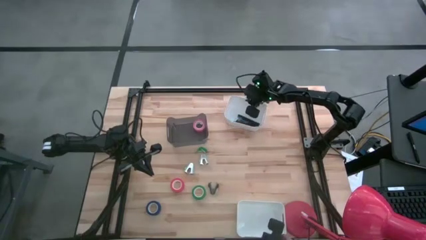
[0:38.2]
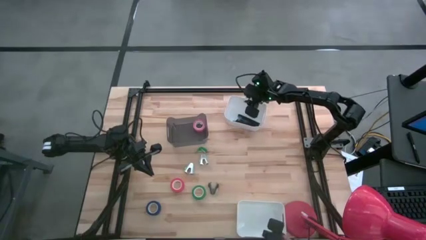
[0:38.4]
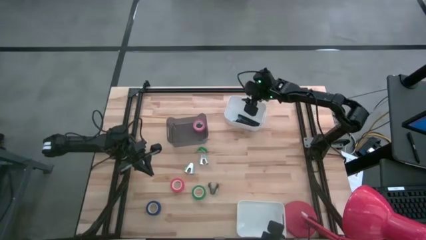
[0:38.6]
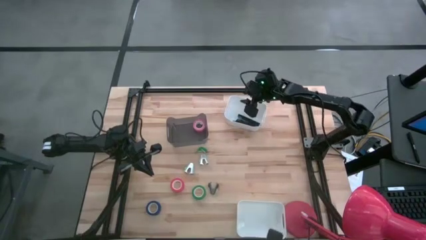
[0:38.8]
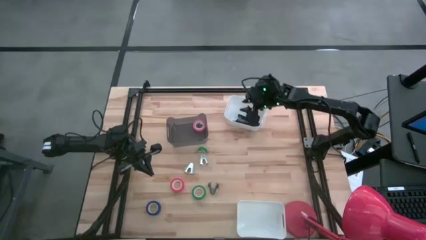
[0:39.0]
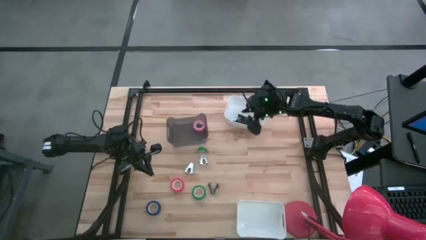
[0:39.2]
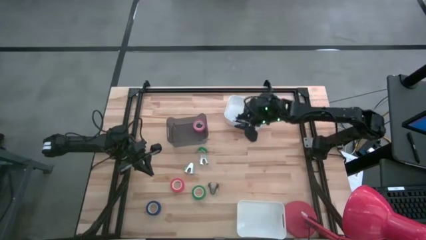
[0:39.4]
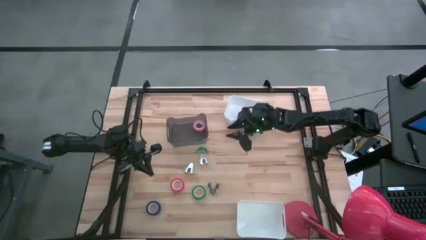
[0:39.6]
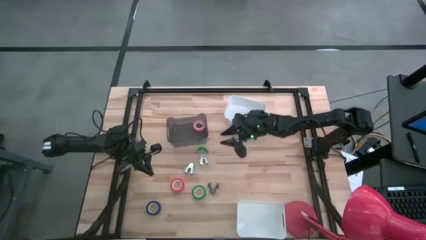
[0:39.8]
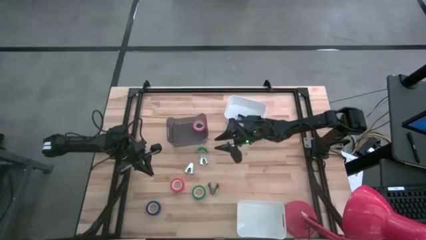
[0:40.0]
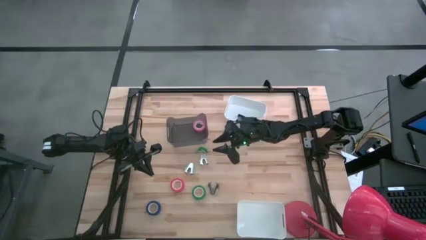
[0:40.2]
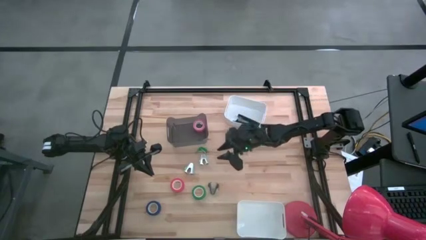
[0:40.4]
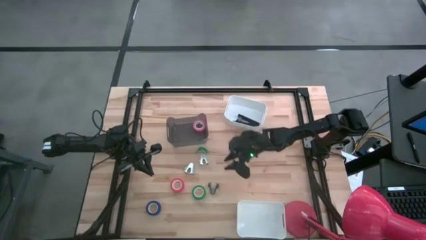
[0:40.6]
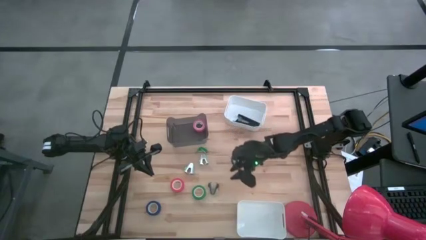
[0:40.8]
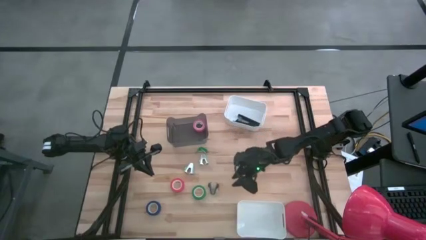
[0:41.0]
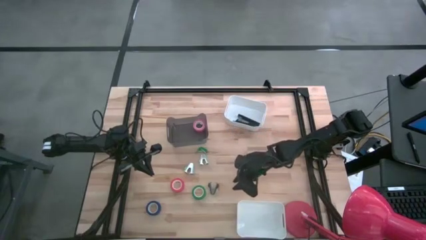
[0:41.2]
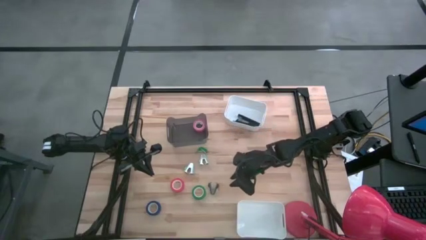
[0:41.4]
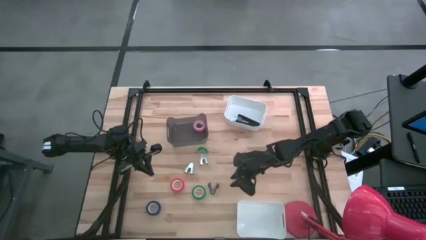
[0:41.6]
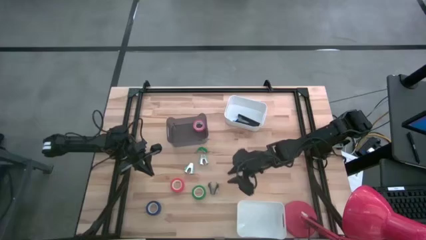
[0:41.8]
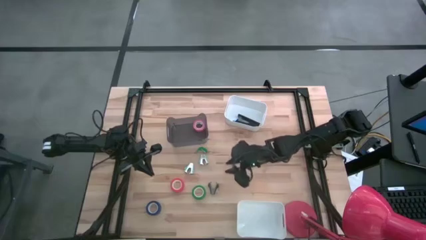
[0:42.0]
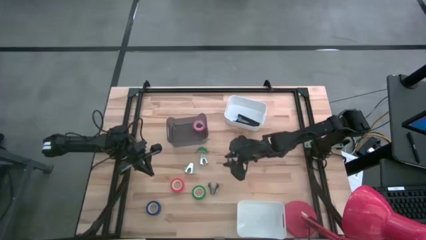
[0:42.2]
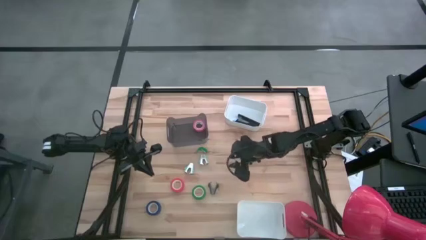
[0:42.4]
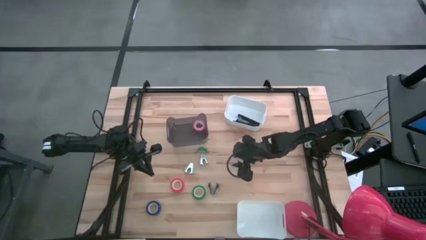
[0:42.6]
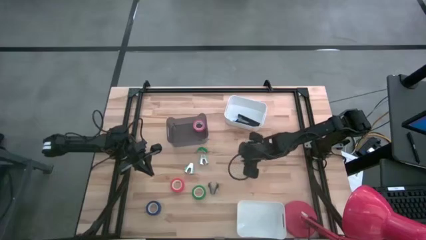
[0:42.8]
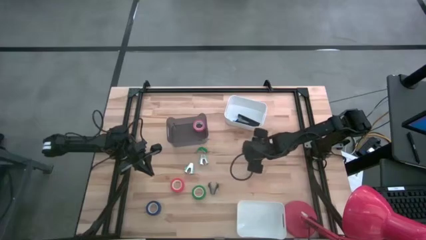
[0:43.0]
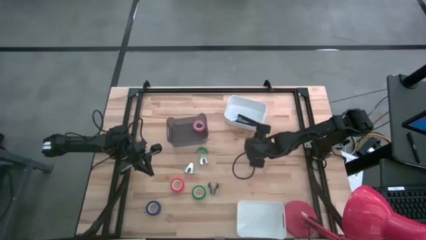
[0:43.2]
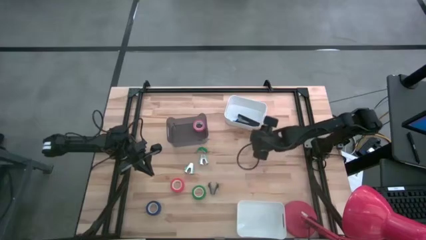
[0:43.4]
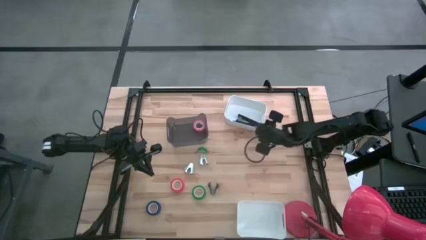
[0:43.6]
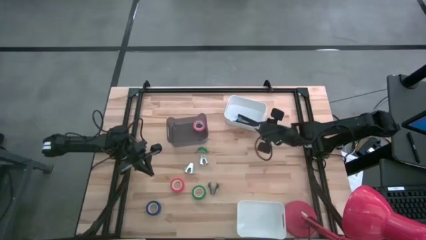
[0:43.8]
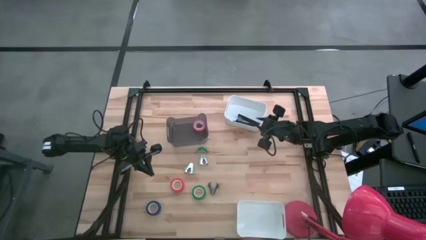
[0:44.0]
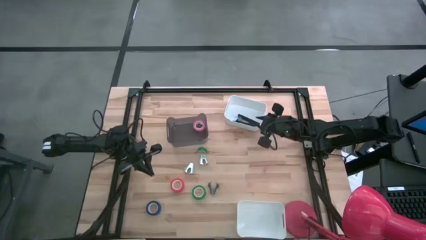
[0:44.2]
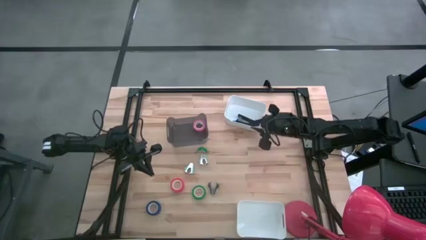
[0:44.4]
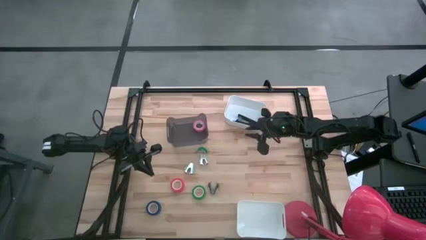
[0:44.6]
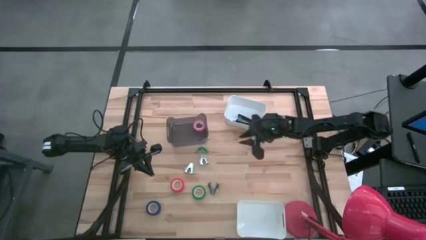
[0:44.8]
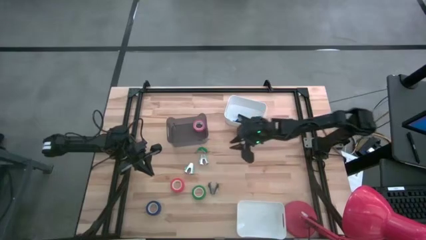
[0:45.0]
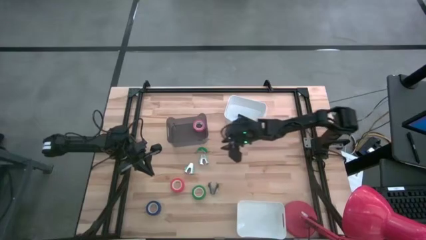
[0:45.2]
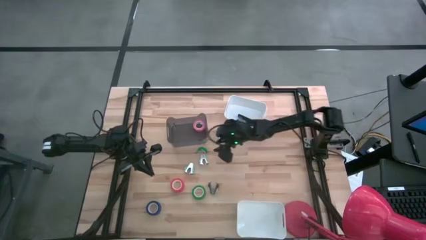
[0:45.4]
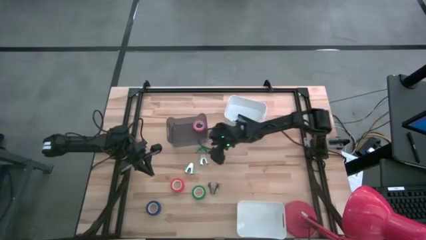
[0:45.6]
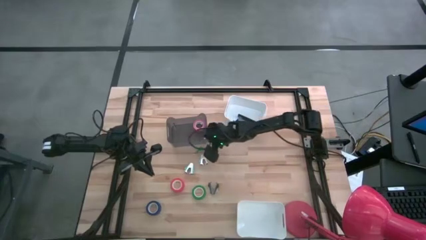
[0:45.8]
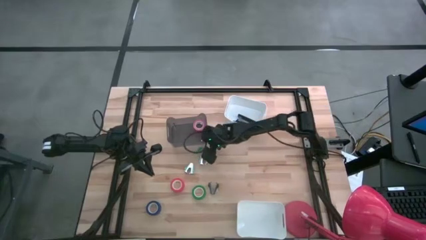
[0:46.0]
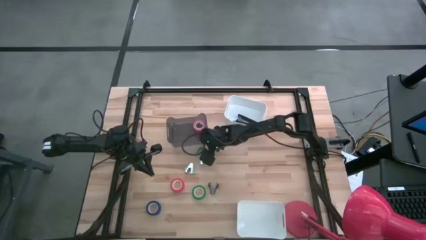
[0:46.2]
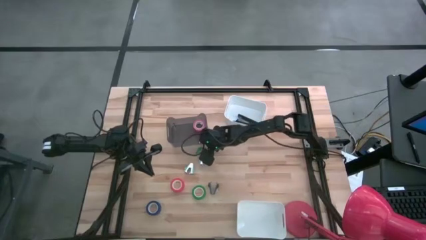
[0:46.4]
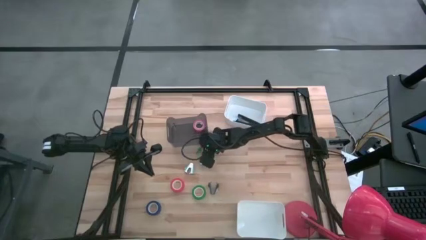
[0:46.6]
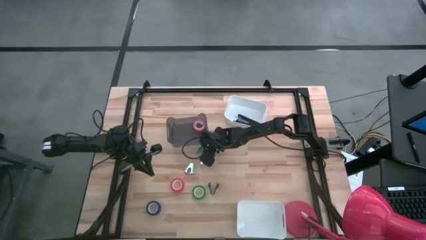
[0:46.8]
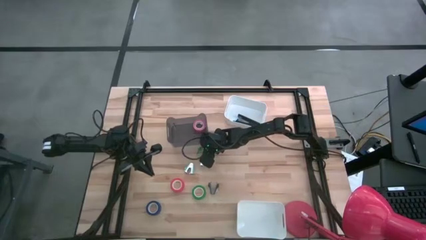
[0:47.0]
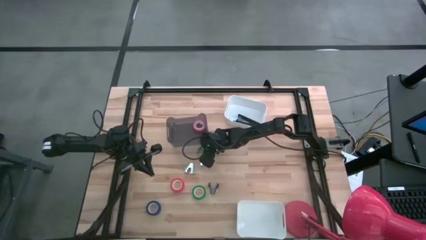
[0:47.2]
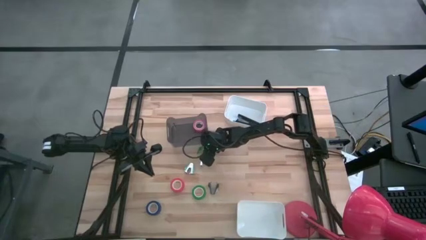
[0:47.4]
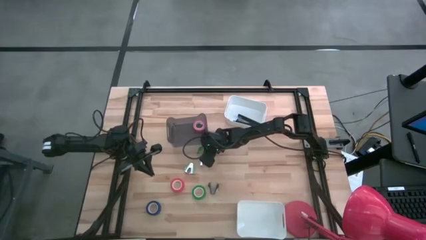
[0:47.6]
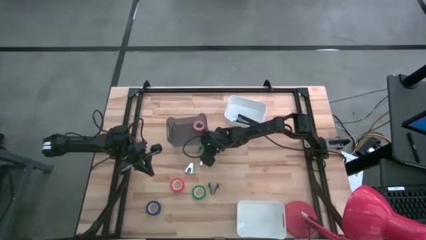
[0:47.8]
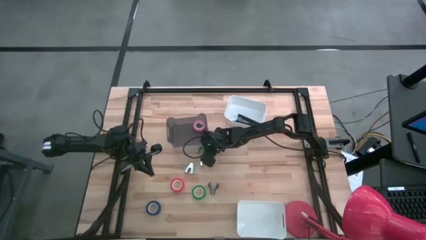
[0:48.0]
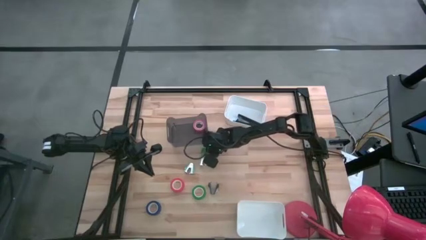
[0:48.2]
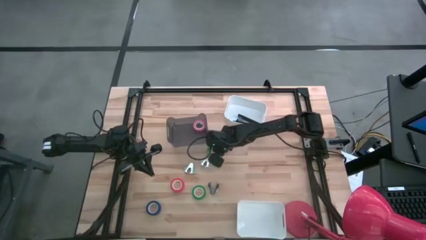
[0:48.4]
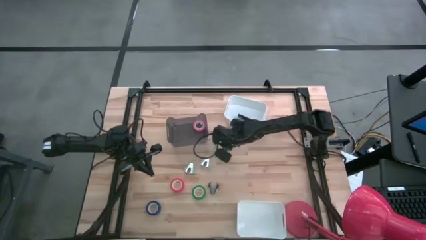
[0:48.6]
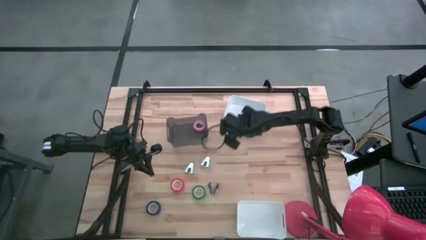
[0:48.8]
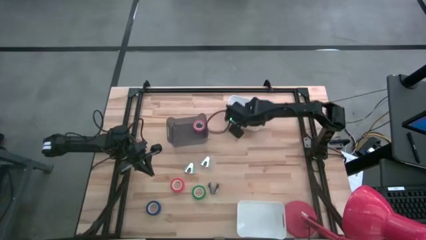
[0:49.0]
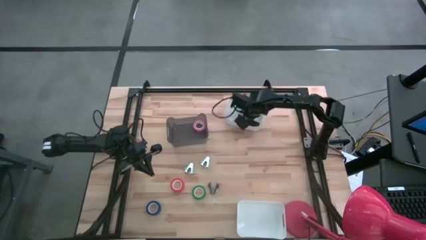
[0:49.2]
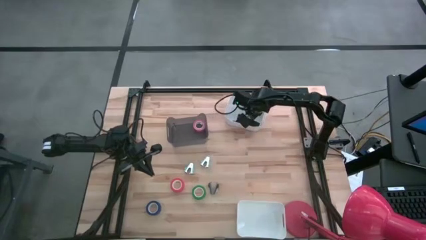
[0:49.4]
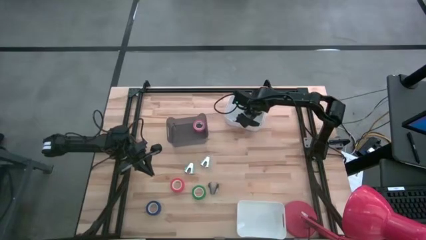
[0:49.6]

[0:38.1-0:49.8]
Task: Pick and place Stapler, Stapler remover, tape
Put the green stapler into the top white bin

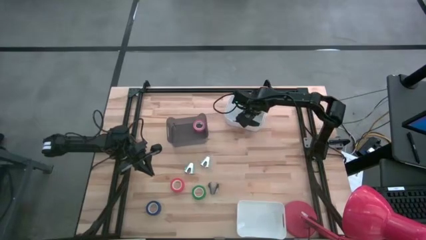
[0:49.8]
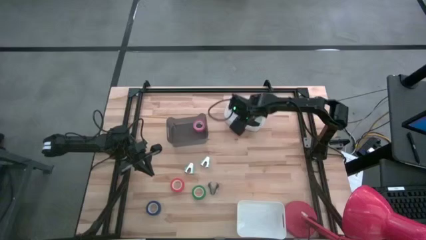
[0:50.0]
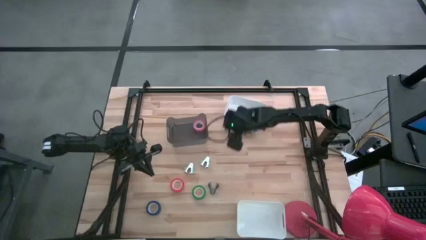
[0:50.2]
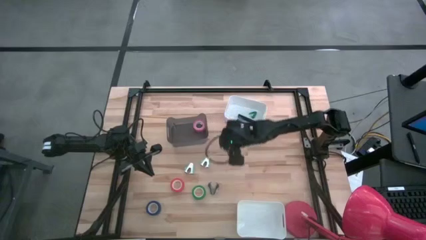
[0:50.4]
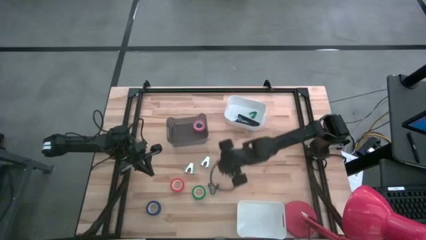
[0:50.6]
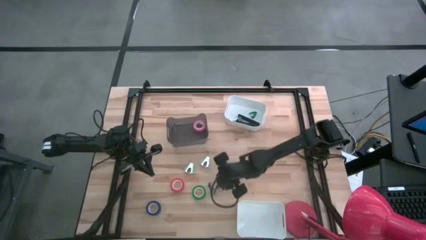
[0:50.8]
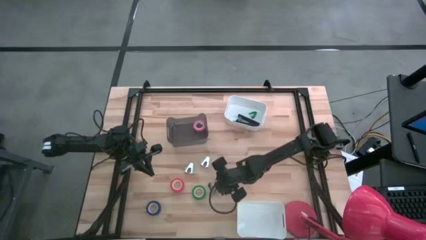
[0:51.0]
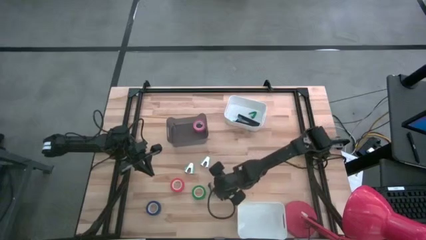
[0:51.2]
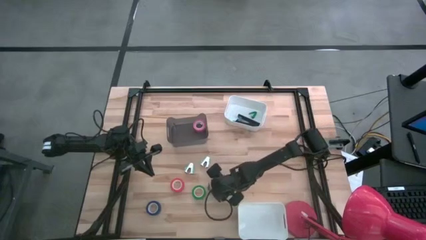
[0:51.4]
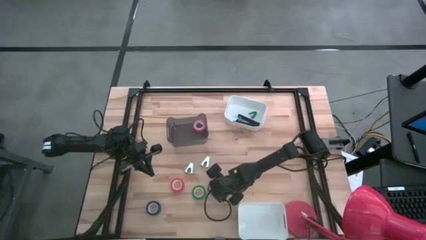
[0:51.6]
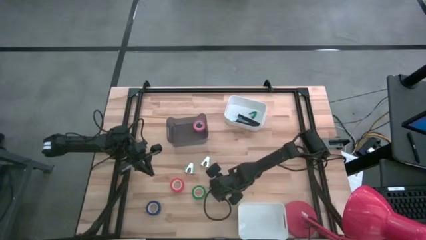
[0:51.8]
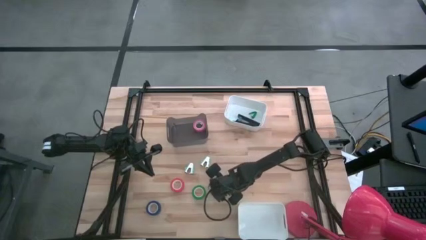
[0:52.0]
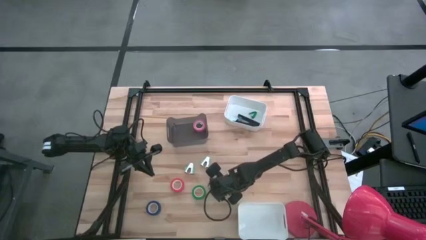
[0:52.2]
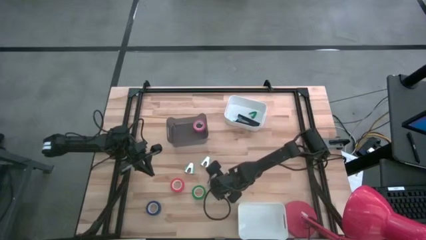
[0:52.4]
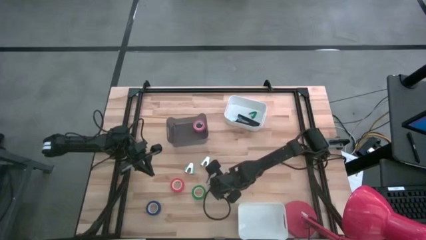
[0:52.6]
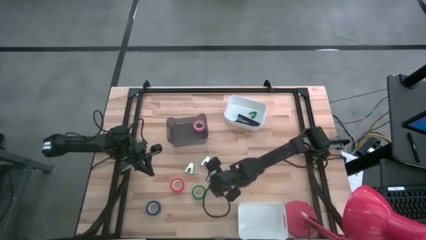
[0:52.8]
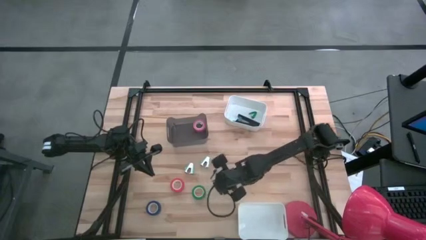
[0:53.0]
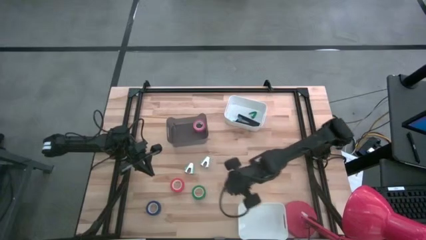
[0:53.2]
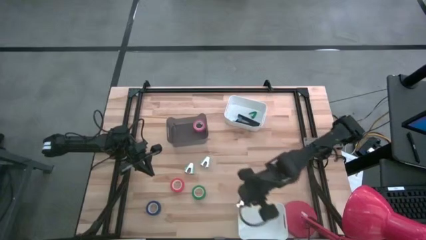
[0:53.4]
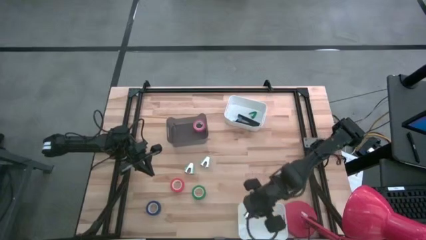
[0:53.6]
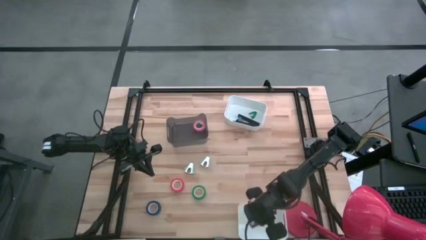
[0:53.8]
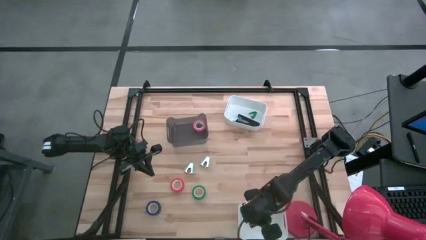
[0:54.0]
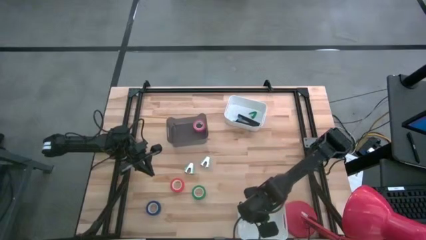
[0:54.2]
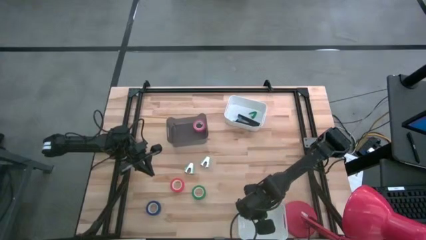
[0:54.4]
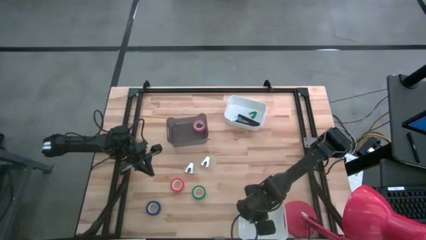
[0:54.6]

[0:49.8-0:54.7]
Put the black staple remover into the bottom white bin
